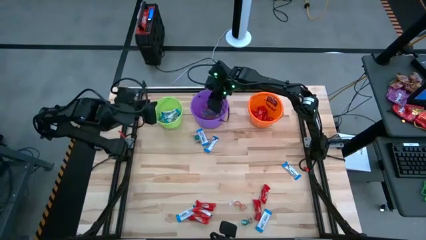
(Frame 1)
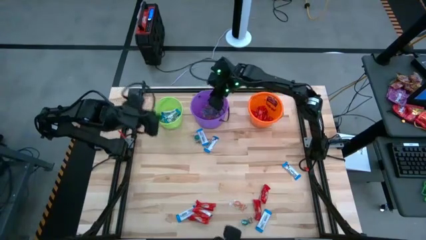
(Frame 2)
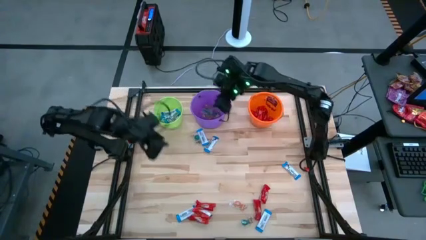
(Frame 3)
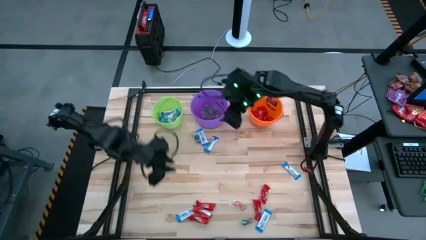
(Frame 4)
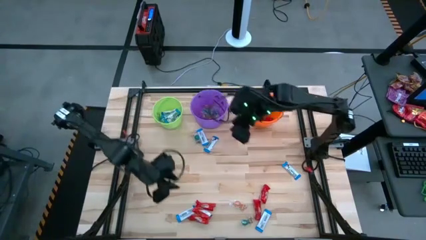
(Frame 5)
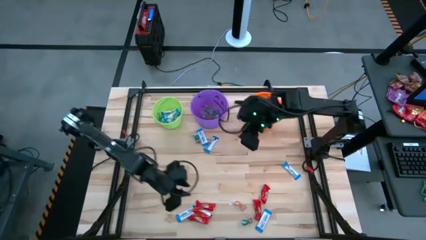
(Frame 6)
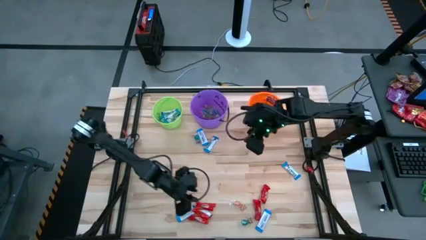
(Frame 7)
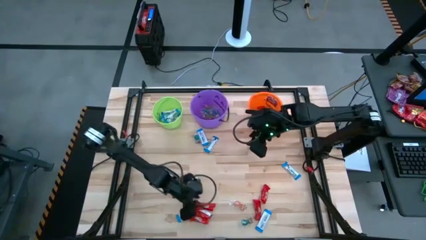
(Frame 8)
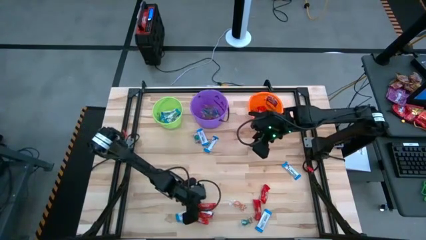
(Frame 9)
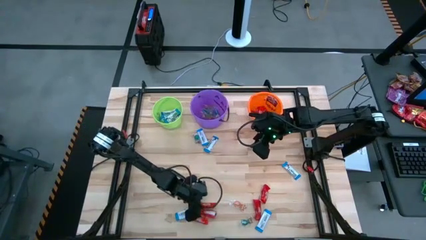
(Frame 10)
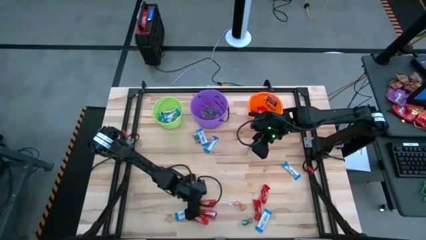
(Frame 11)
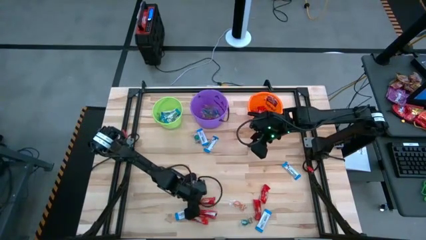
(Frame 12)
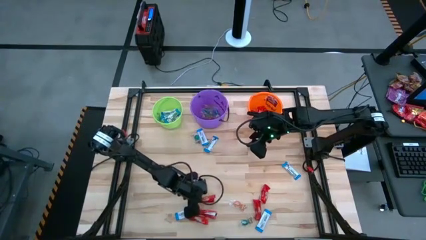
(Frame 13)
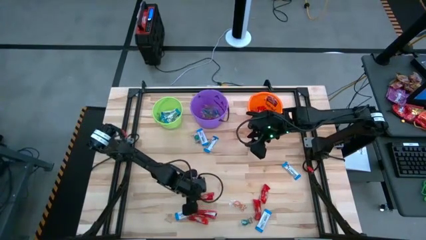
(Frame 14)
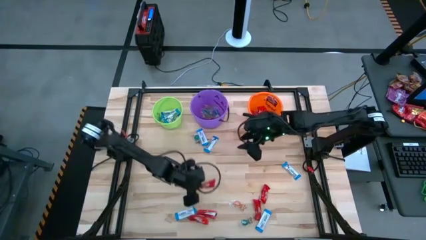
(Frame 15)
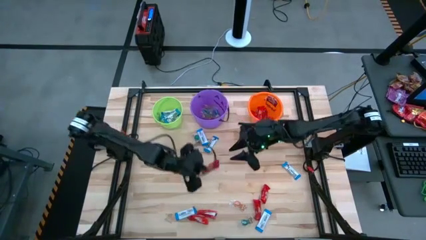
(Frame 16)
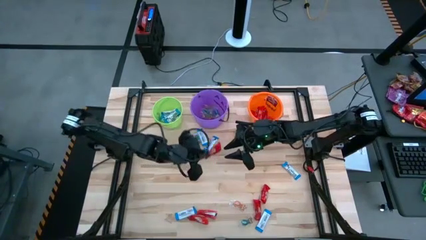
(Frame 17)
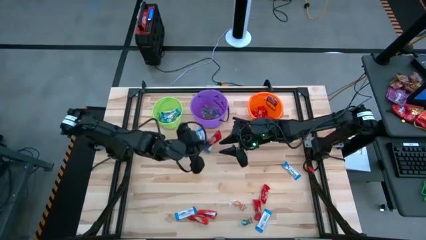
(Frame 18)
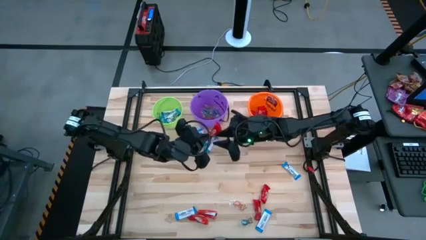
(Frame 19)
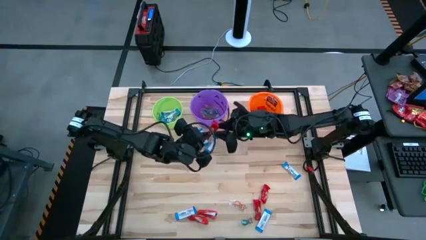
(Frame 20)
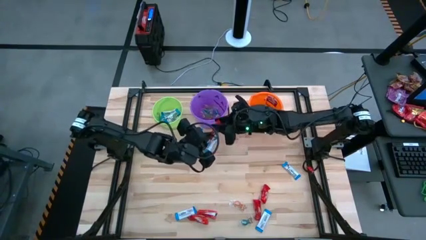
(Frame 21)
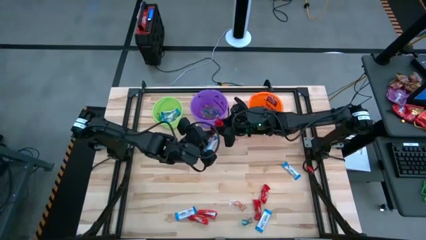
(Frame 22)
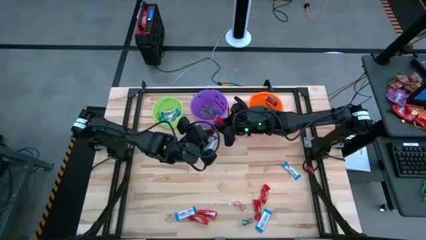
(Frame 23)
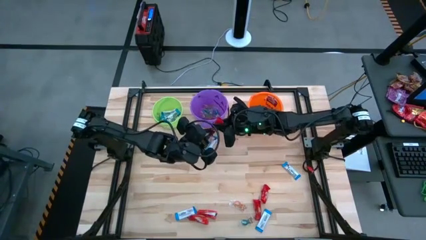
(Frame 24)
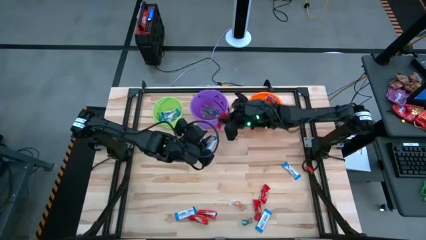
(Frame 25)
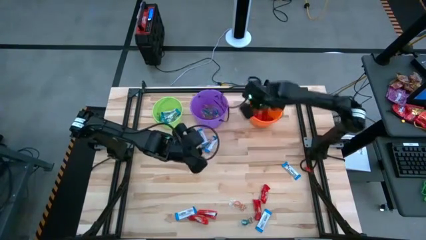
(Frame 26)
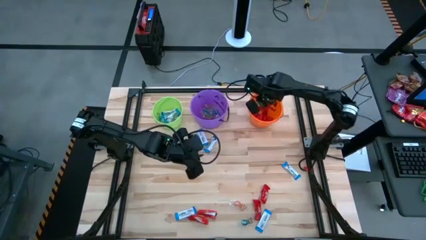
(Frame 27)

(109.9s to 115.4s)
Task: Sort candy by brand, put in halloween buckets
Put the red chocolate into the orange bucket

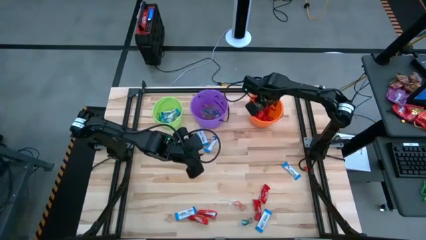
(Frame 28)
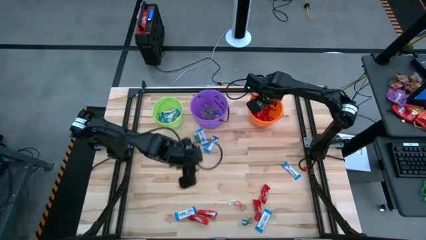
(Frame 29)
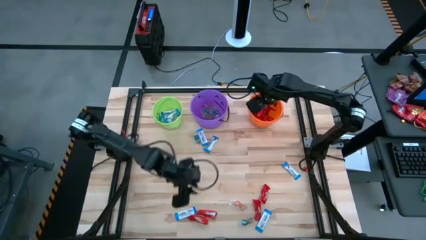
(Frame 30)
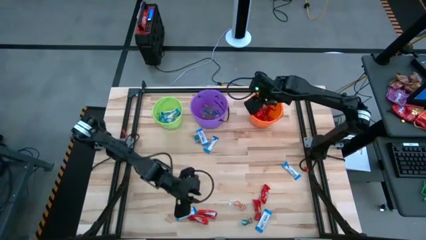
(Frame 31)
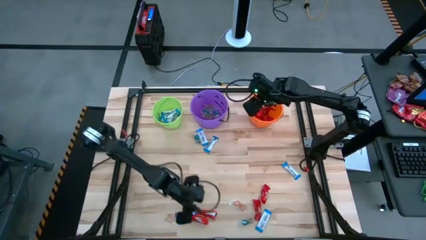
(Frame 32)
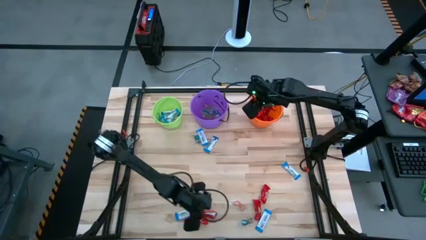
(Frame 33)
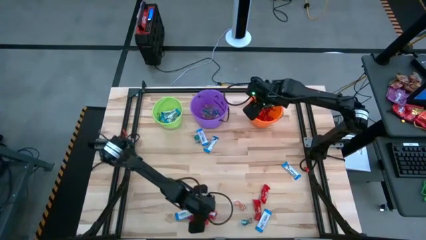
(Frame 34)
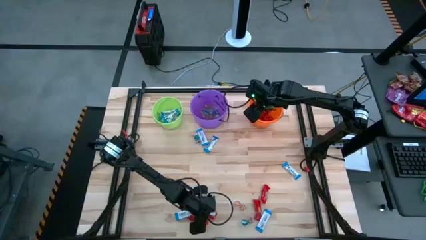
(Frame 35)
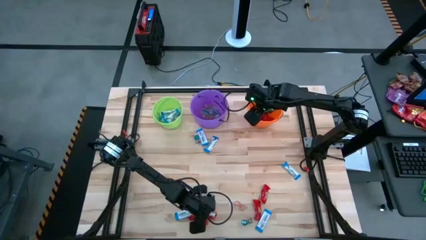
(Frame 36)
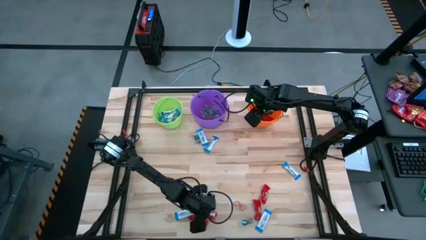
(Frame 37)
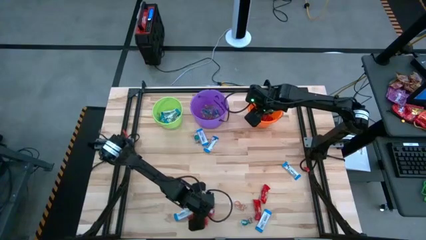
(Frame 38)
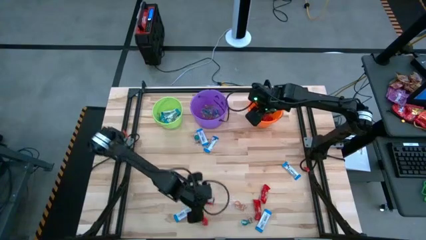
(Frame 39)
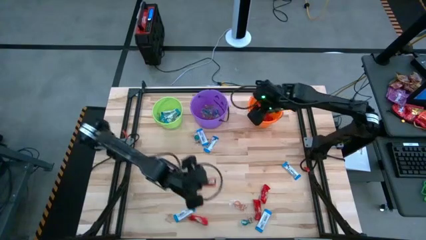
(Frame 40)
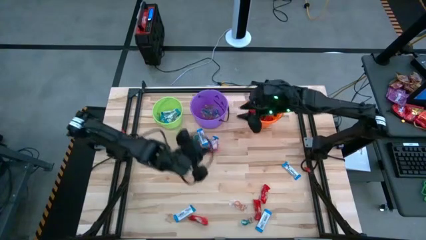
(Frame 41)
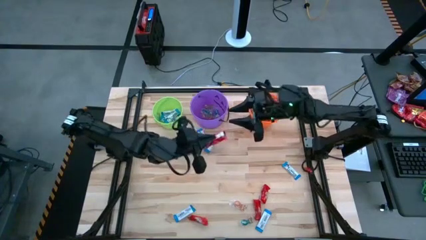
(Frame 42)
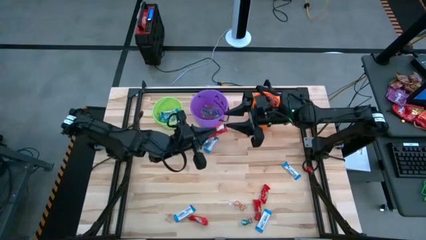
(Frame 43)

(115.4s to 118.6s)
Put the red chocolate into the orange bucket

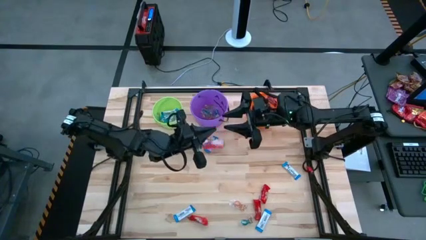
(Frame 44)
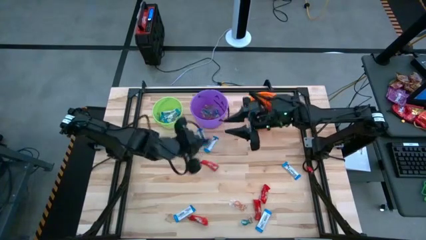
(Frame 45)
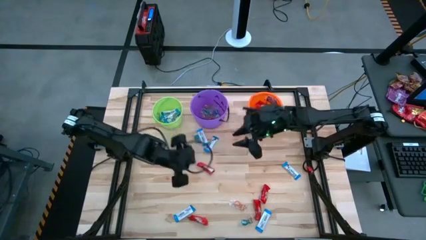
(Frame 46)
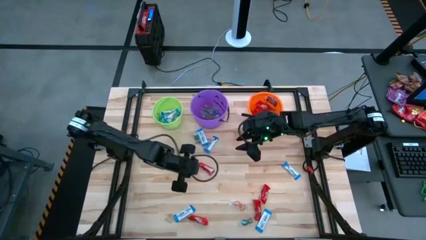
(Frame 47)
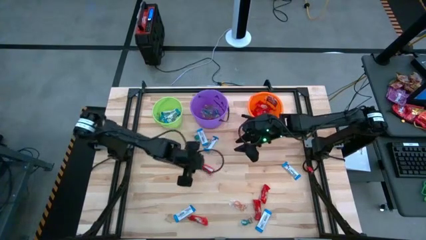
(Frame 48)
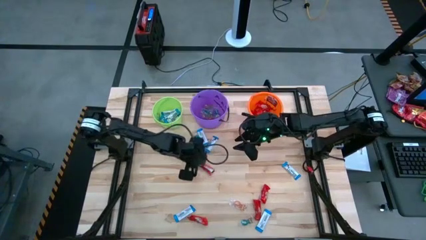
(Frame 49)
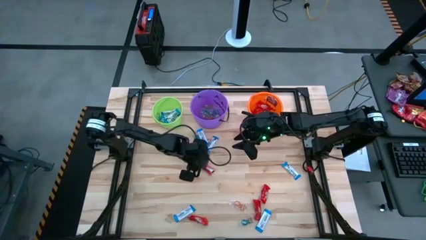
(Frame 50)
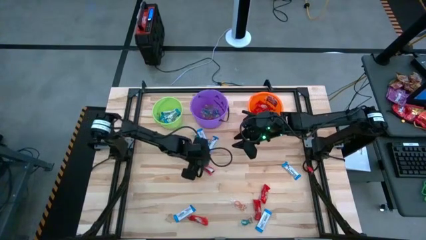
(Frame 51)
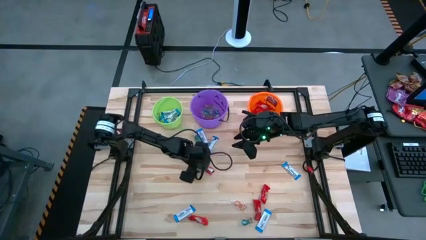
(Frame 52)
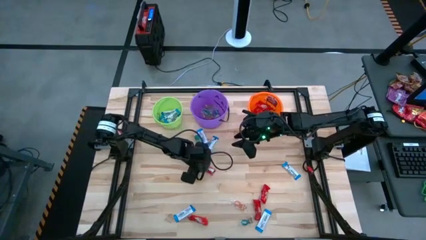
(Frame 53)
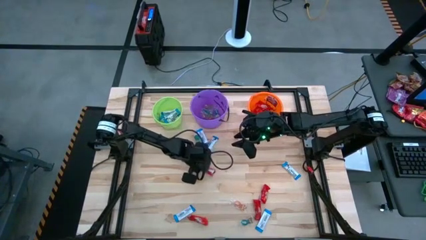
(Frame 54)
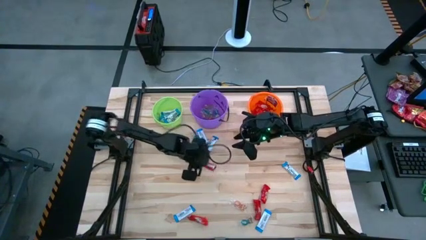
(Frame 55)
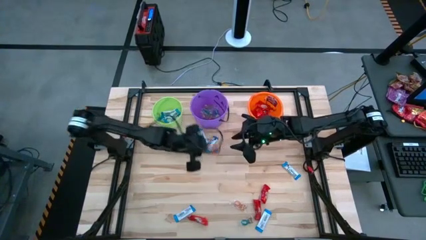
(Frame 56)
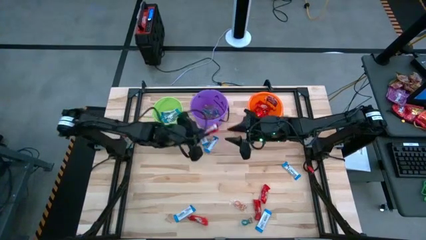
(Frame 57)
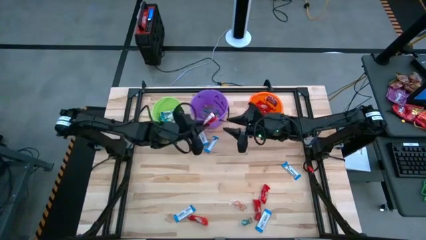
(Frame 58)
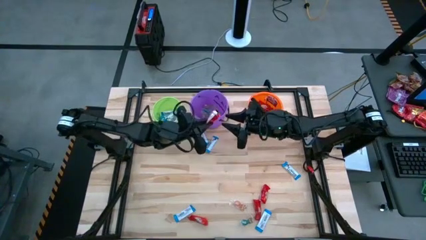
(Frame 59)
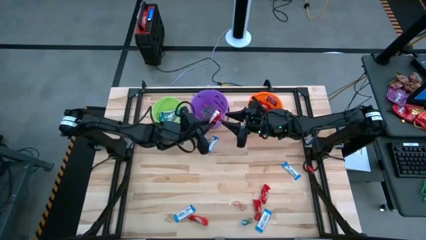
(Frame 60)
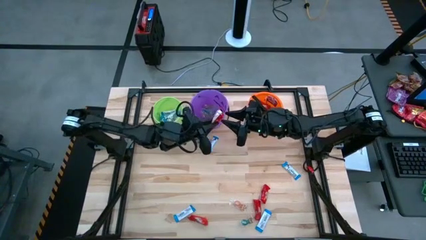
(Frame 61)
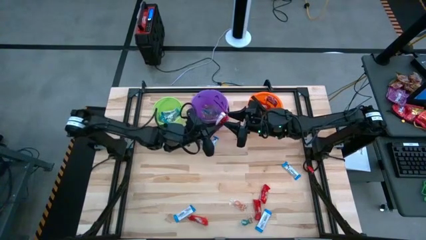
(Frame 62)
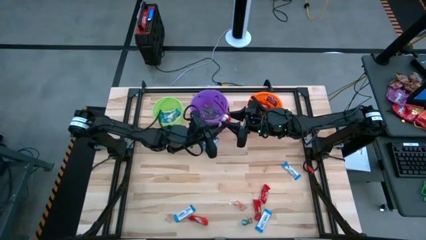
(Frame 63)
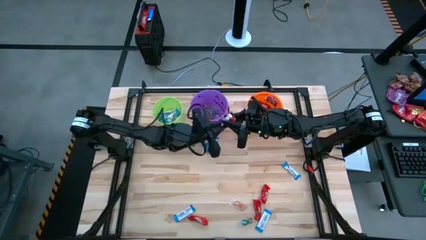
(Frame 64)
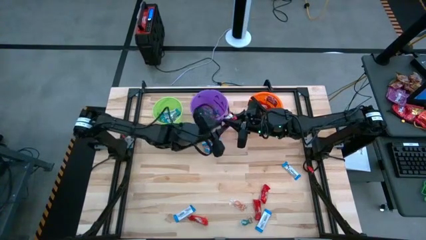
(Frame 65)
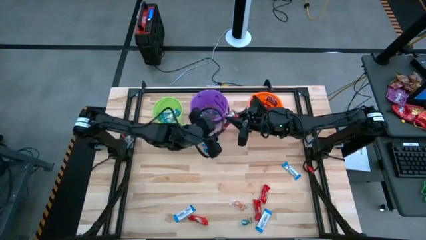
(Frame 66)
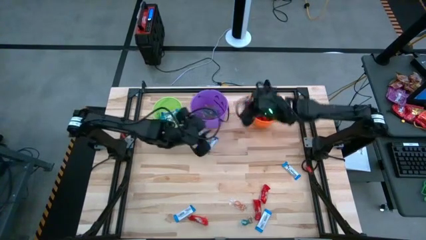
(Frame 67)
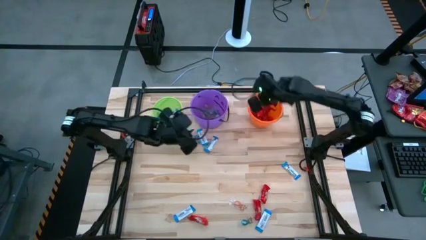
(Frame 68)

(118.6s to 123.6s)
Put the red chocolate into the orange bucket

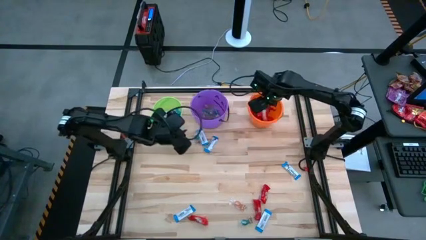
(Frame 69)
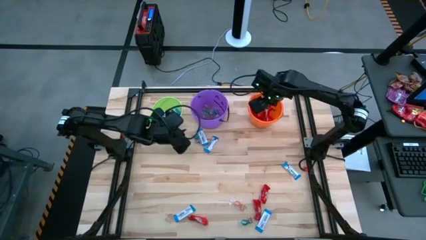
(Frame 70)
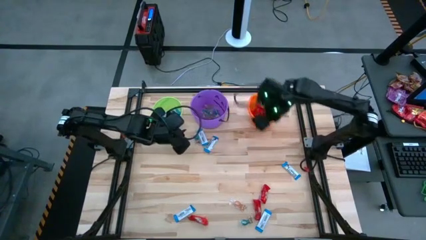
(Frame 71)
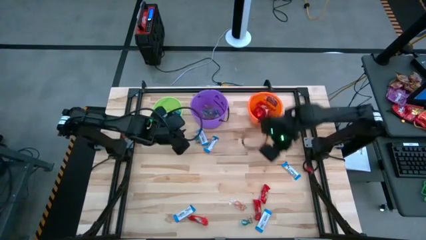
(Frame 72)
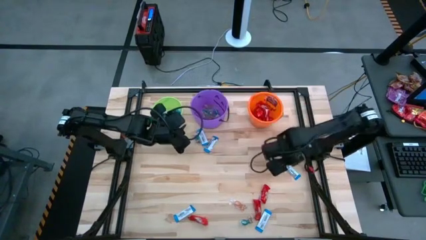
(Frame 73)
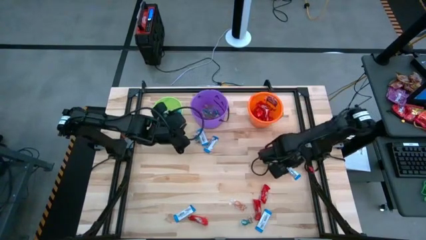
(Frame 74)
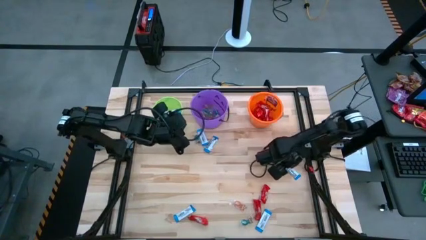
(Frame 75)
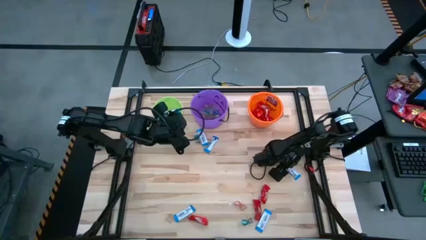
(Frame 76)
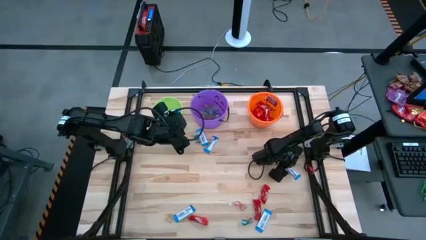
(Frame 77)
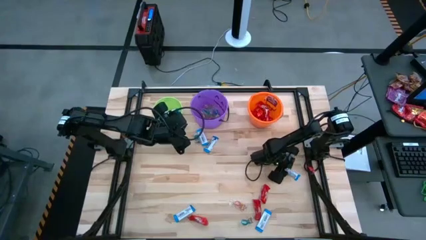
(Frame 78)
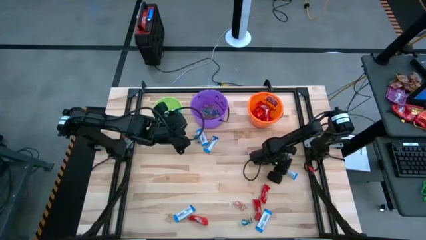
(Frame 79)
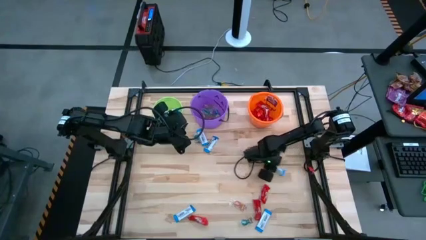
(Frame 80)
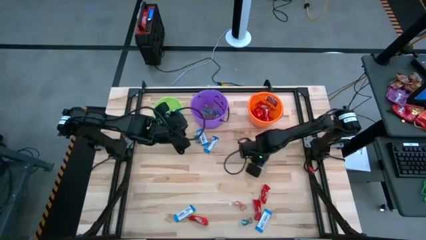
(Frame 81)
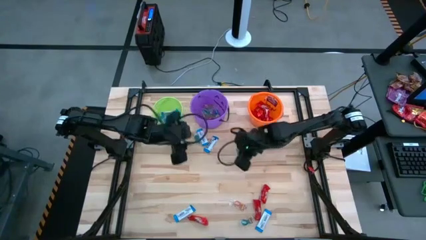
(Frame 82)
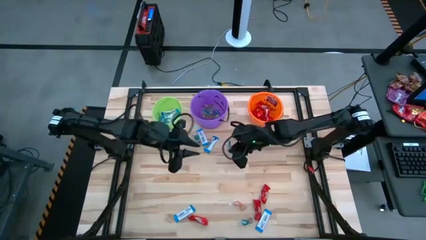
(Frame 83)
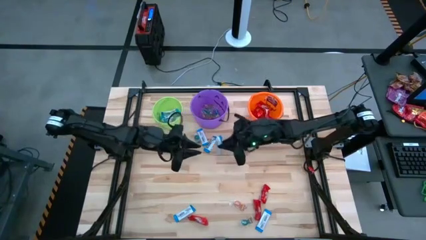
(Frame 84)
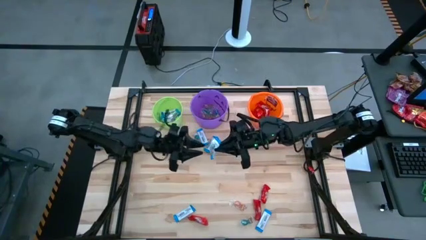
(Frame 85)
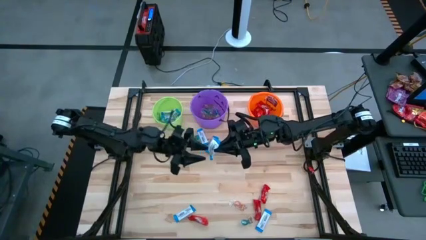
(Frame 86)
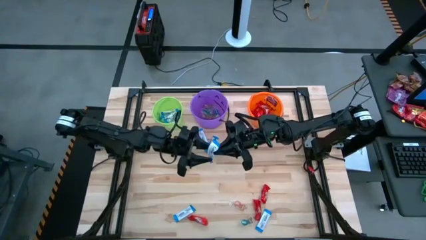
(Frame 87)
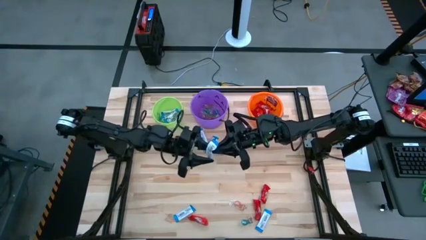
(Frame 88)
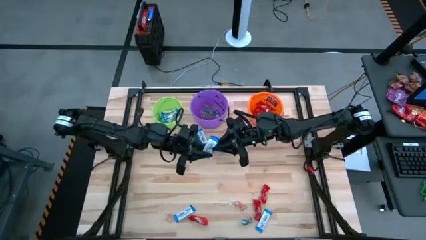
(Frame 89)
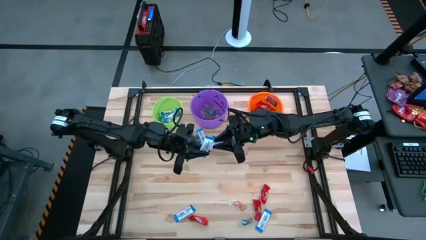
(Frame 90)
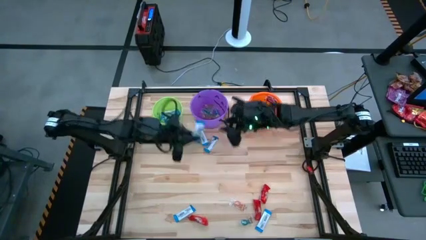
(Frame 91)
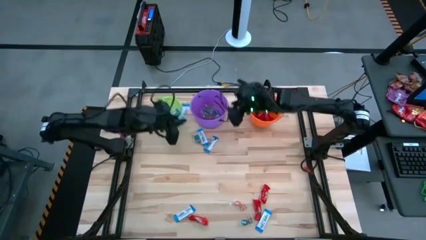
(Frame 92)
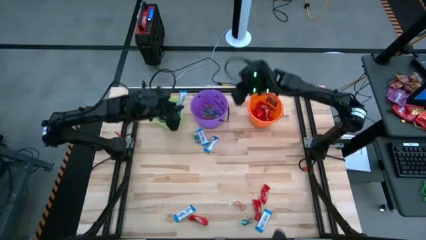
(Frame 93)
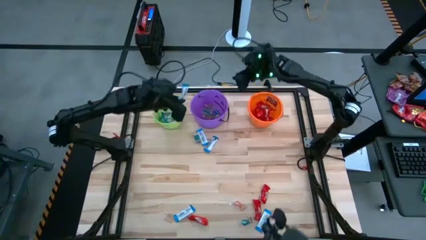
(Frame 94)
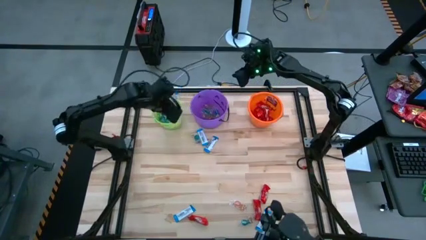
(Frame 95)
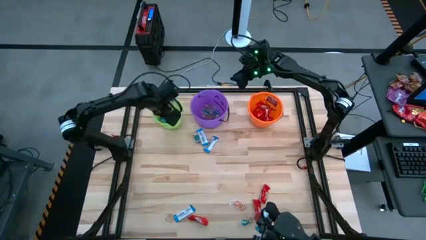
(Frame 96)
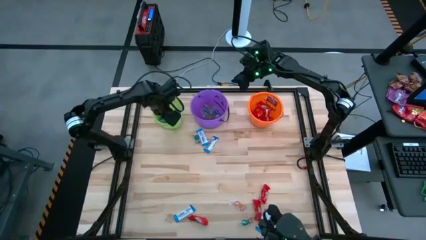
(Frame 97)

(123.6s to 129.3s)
Put the white chocolate into the green bucket
